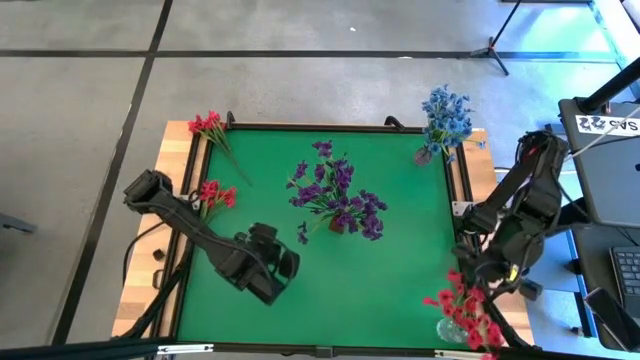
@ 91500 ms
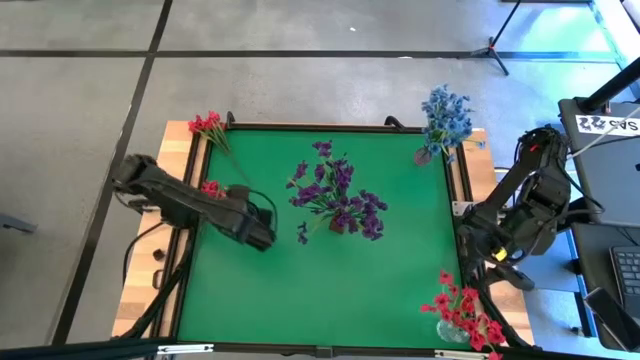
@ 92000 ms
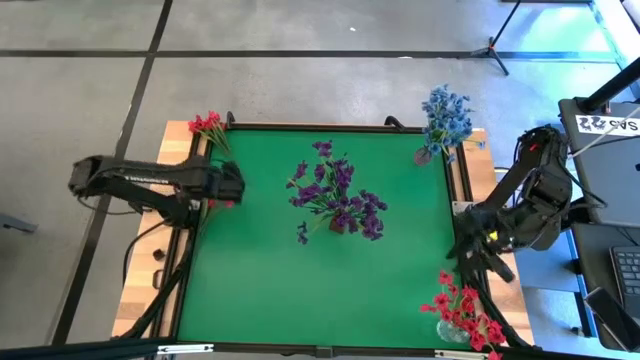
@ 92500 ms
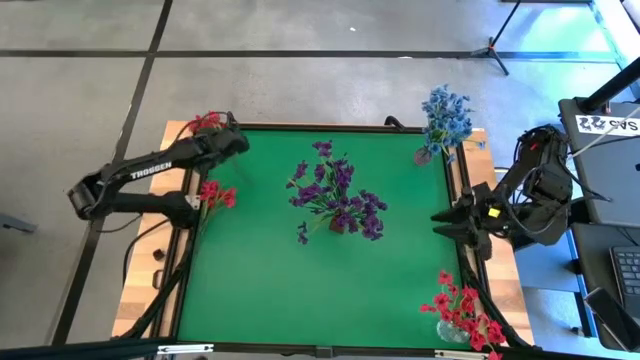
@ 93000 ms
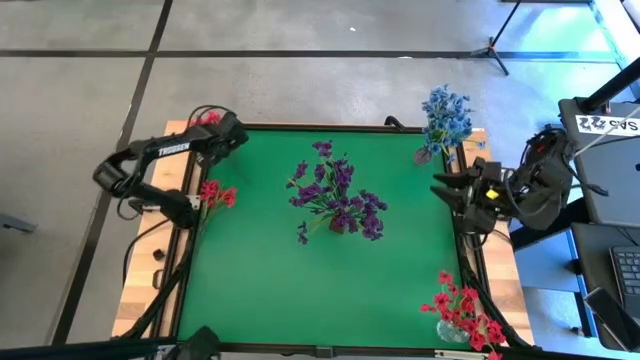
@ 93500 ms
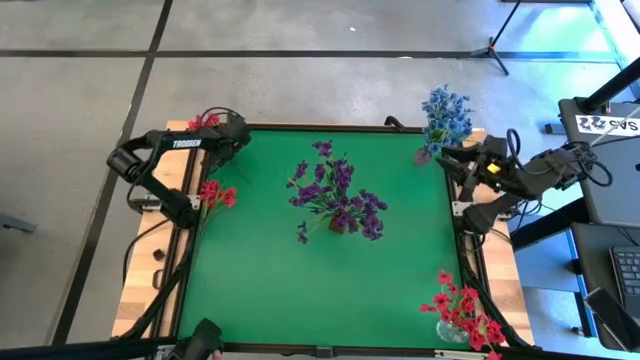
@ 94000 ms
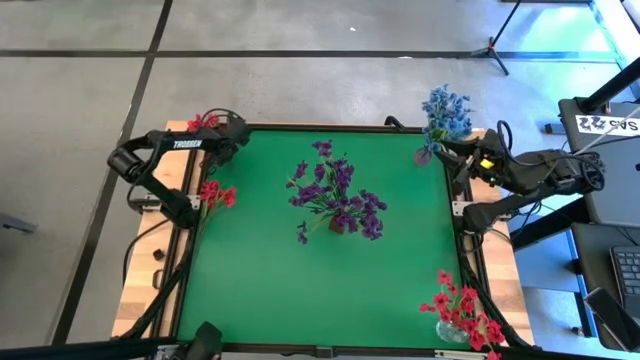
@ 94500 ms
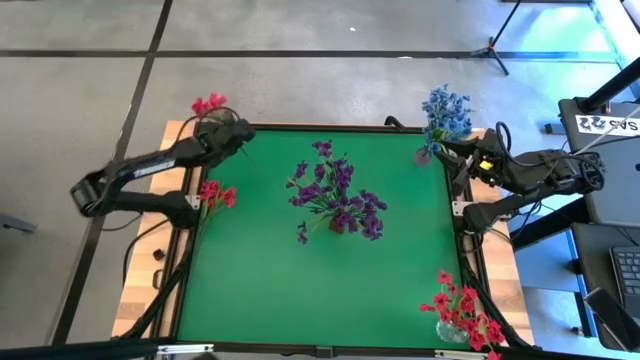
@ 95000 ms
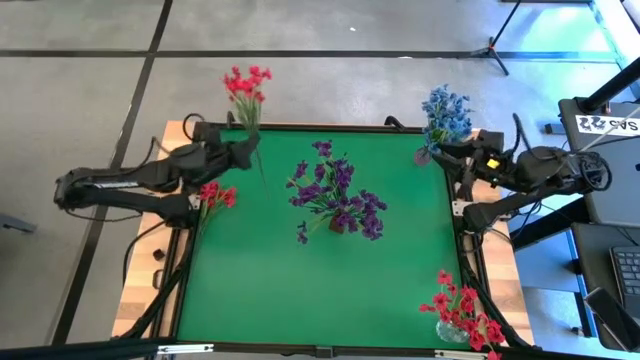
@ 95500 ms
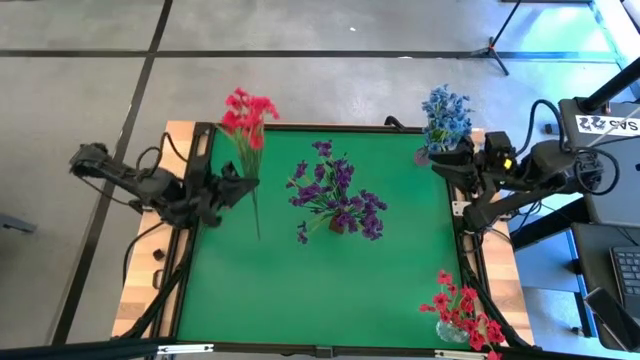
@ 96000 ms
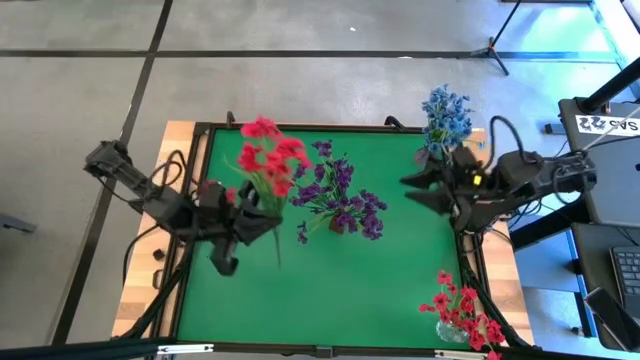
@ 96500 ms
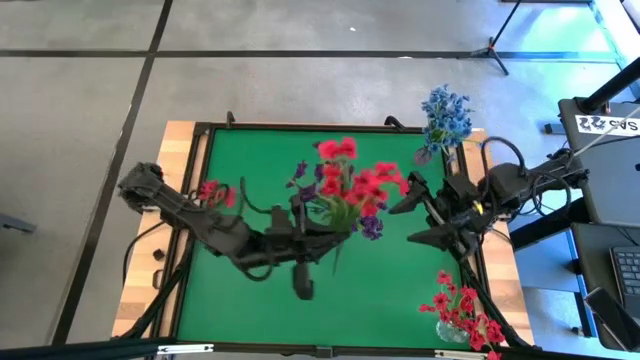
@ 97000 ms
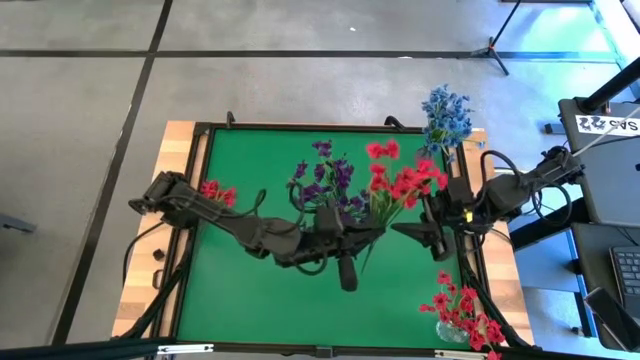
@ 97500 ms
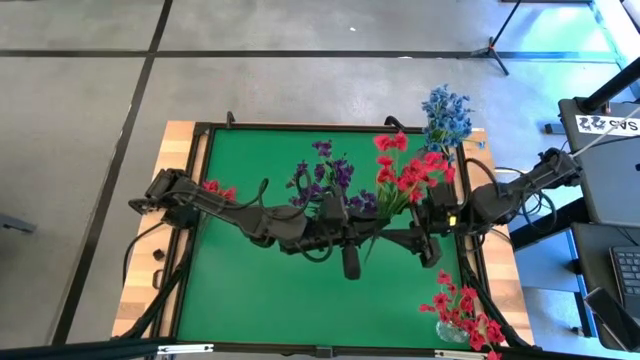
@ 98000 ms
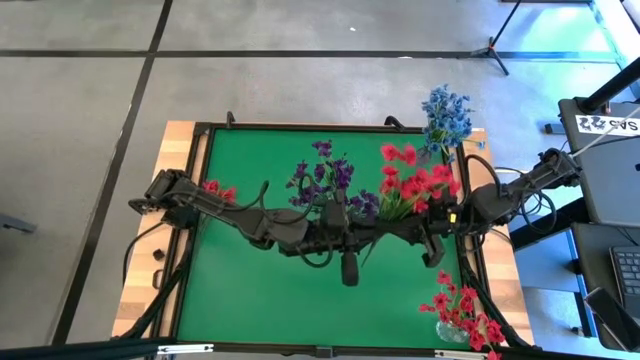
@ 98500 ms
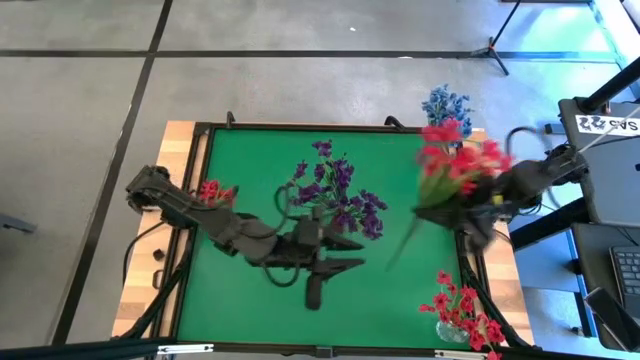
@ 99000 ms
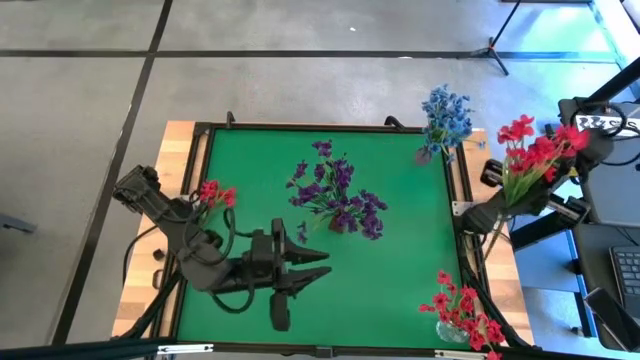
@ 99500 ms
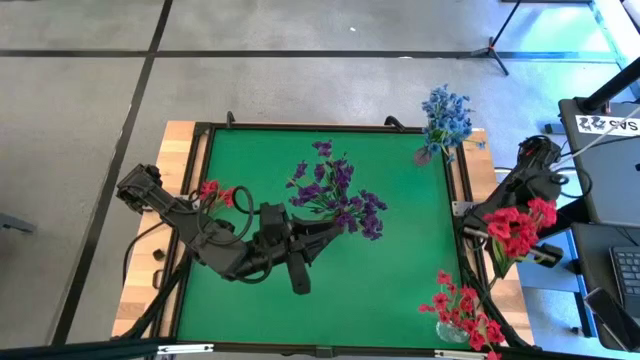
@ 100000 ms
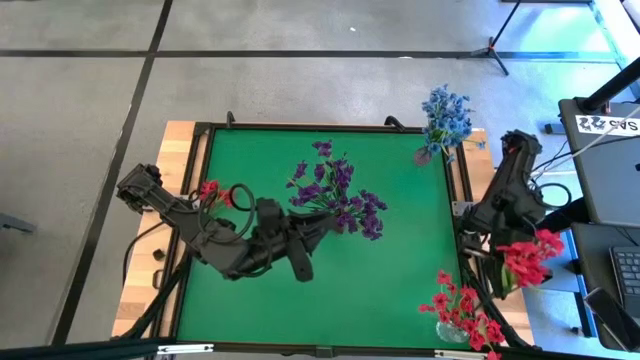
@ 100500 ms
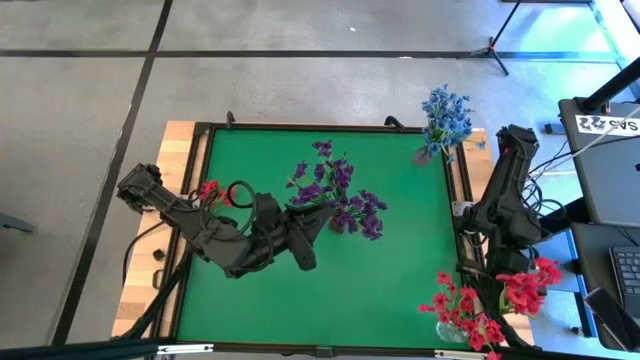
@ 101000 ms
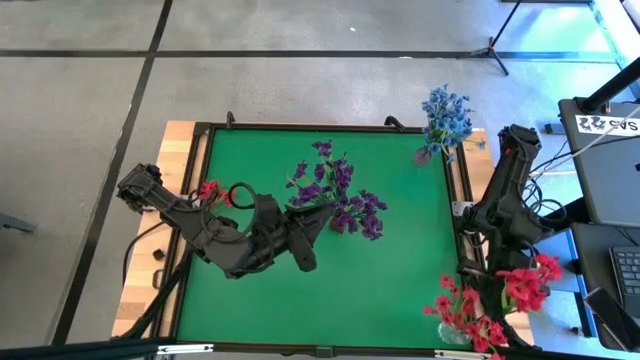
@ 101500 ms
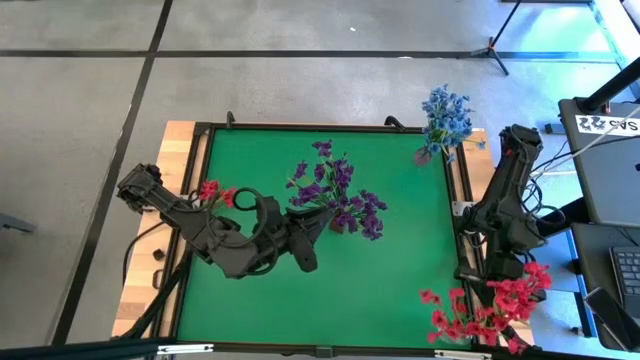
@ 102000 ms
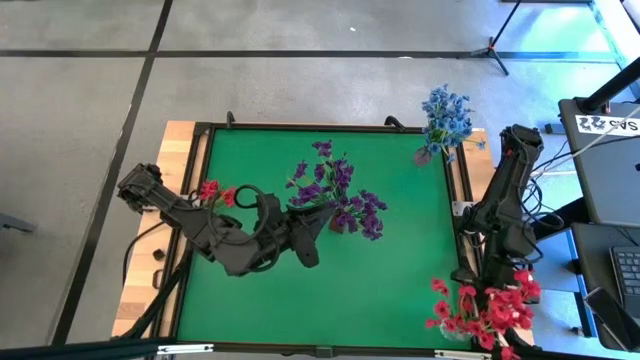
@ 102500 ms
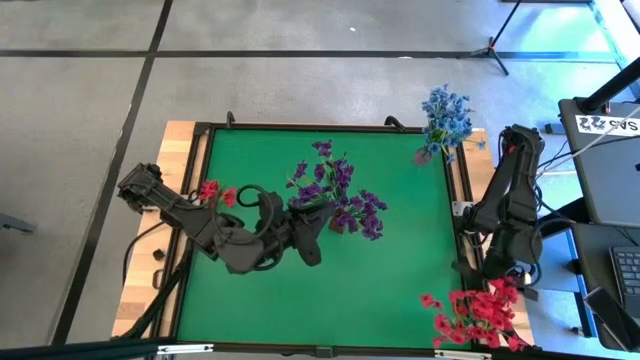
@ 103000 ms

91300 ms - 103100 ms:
Task: Sort flowers into vase by color
Put the top red flowers into the transparent vase

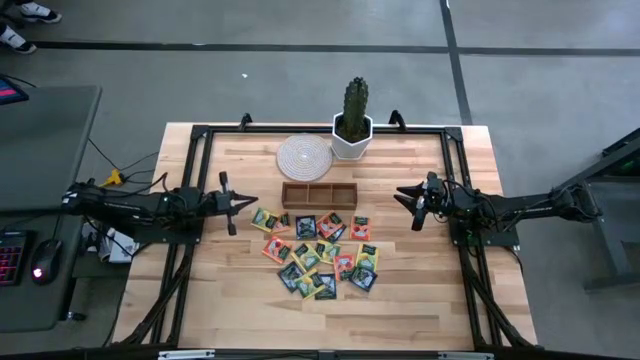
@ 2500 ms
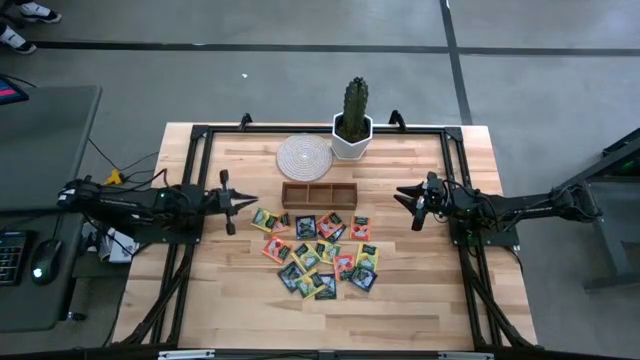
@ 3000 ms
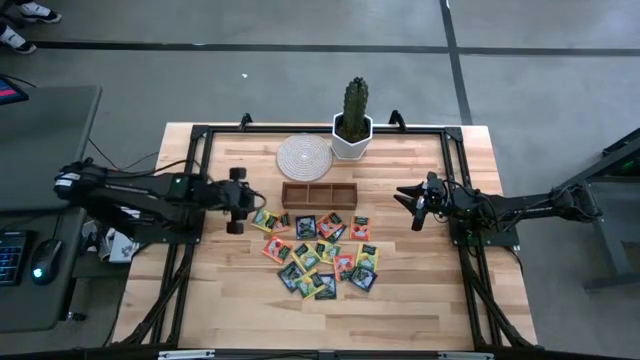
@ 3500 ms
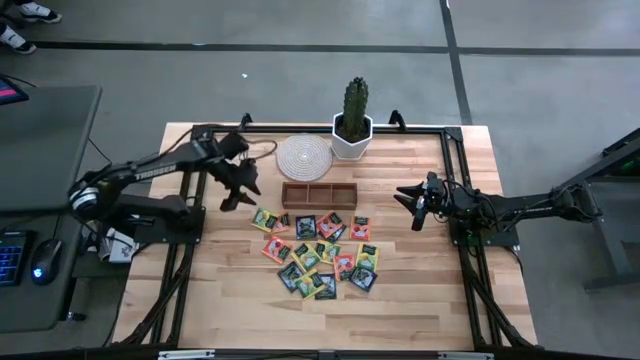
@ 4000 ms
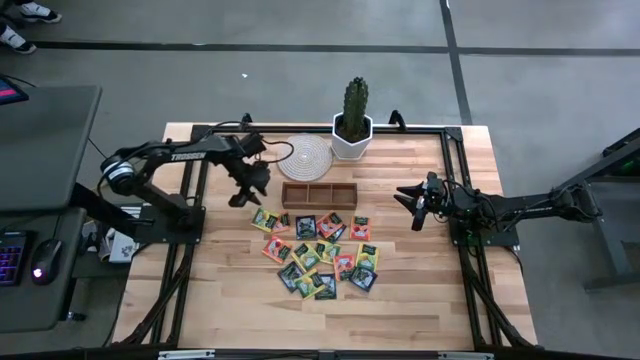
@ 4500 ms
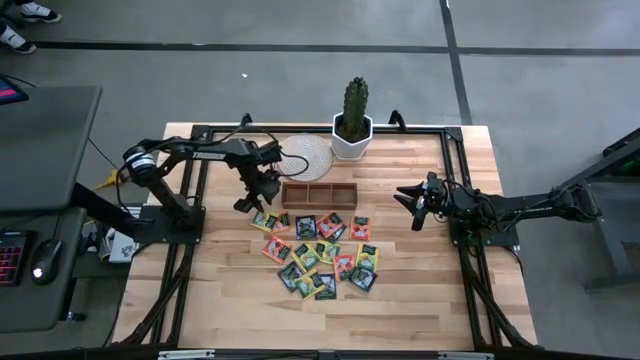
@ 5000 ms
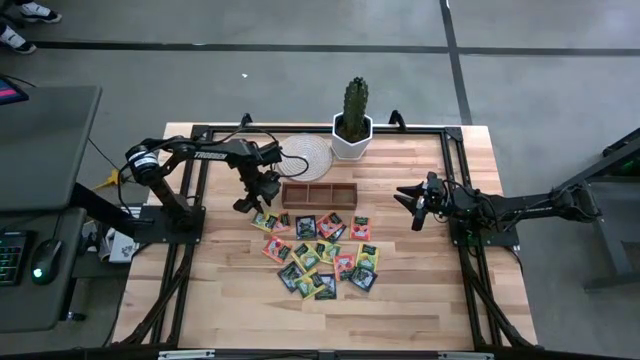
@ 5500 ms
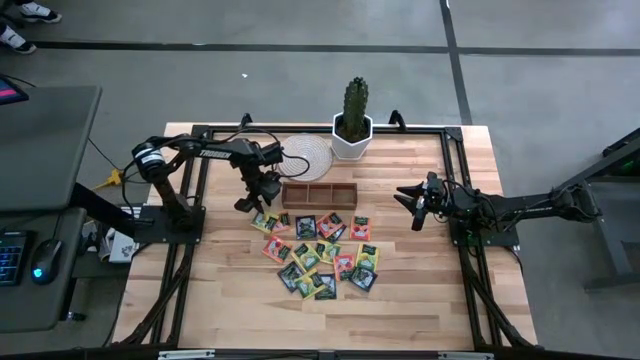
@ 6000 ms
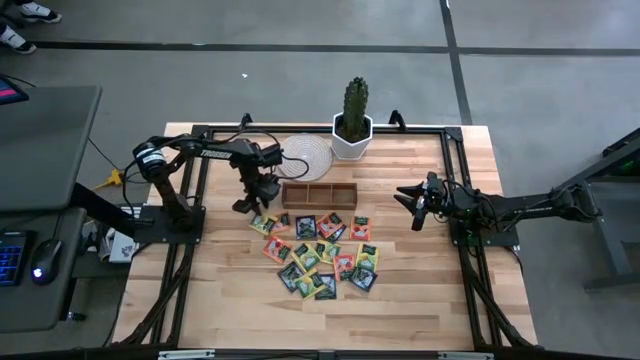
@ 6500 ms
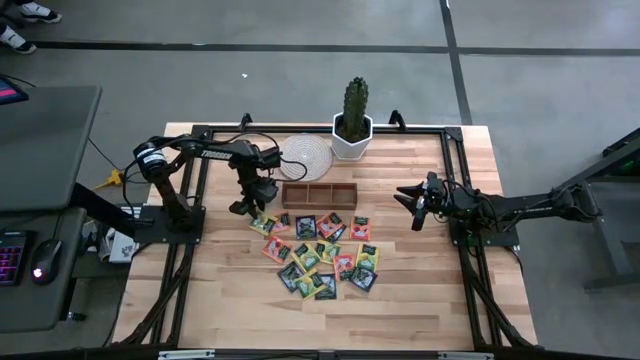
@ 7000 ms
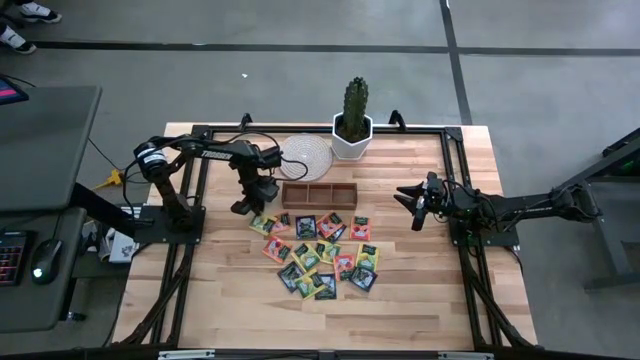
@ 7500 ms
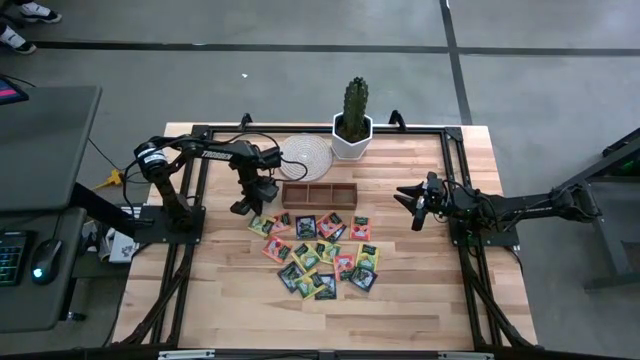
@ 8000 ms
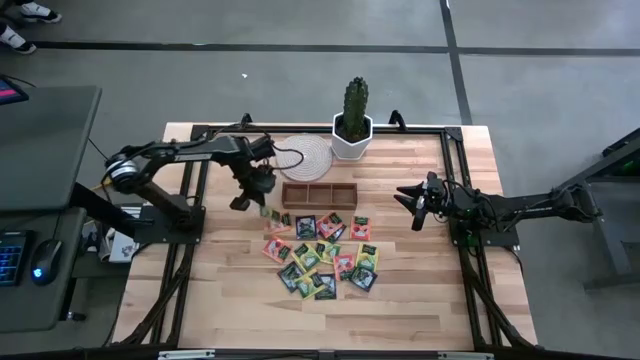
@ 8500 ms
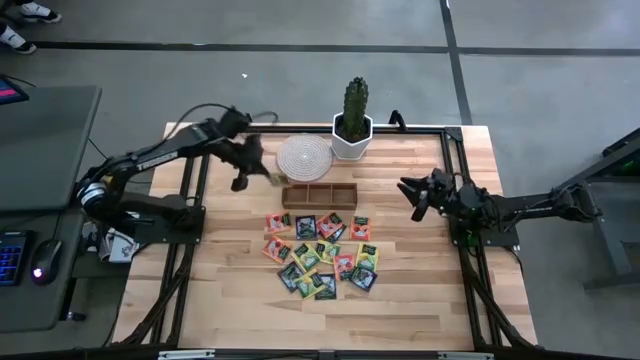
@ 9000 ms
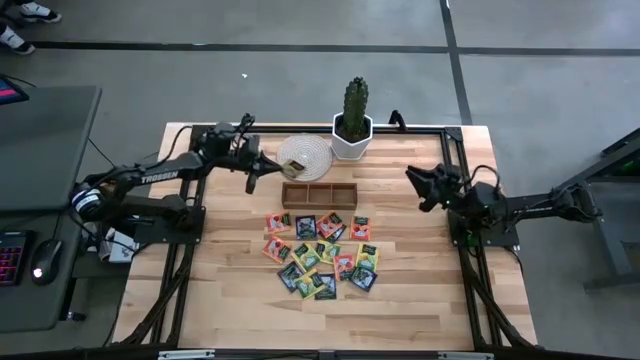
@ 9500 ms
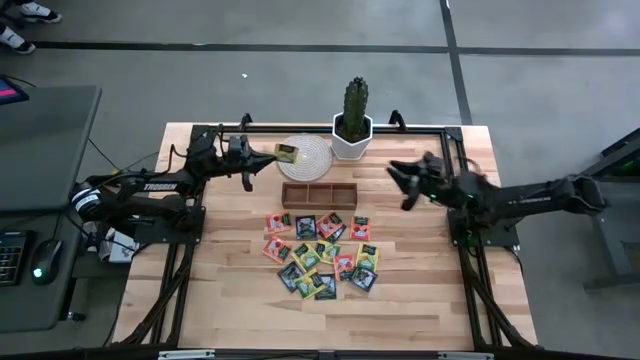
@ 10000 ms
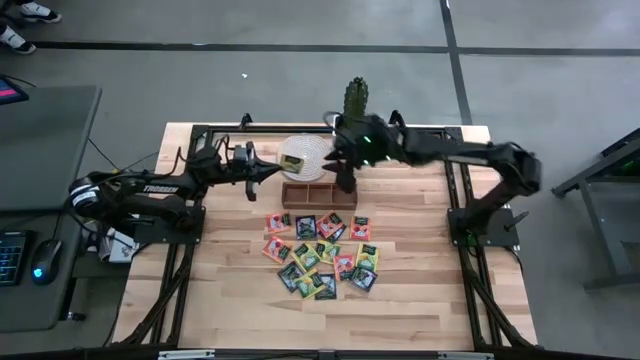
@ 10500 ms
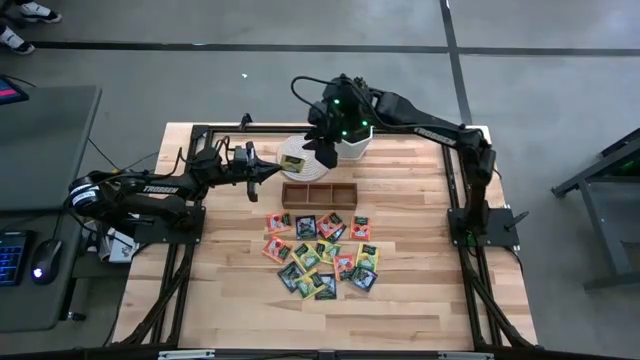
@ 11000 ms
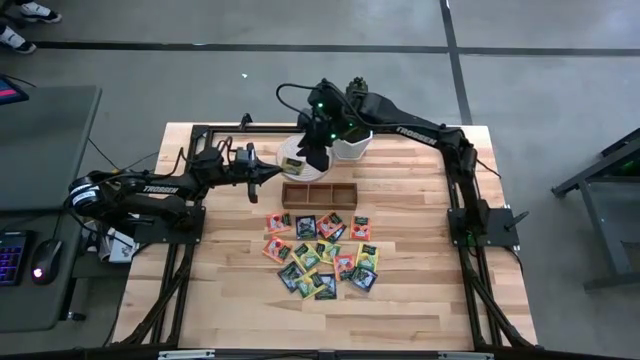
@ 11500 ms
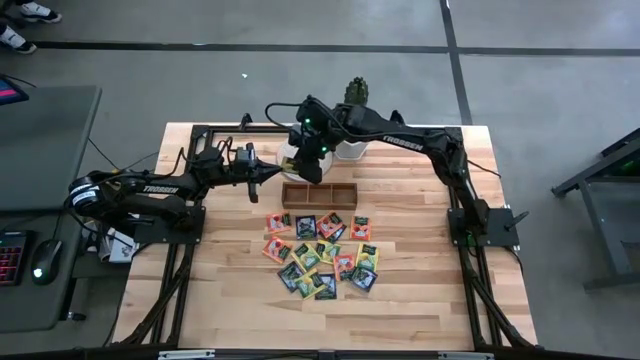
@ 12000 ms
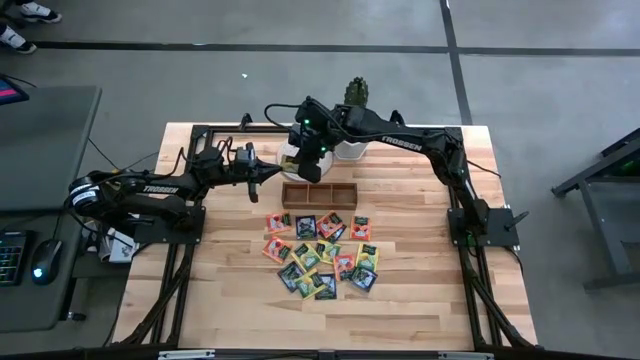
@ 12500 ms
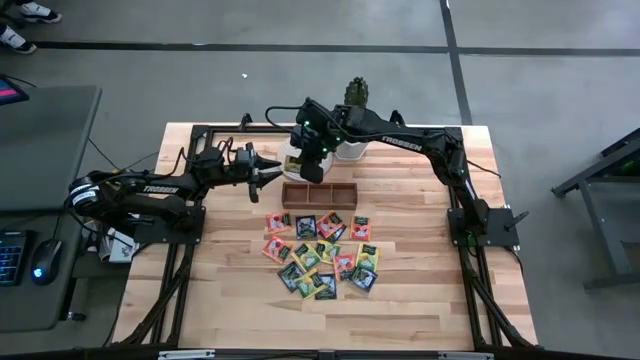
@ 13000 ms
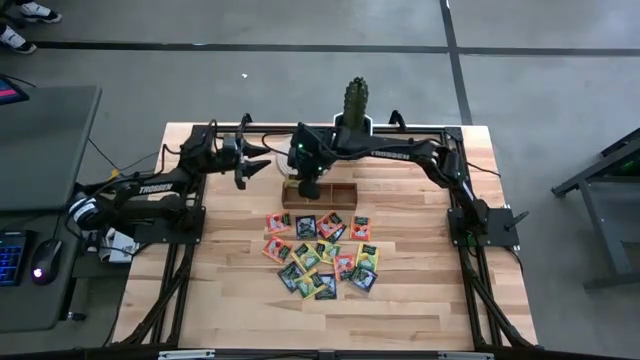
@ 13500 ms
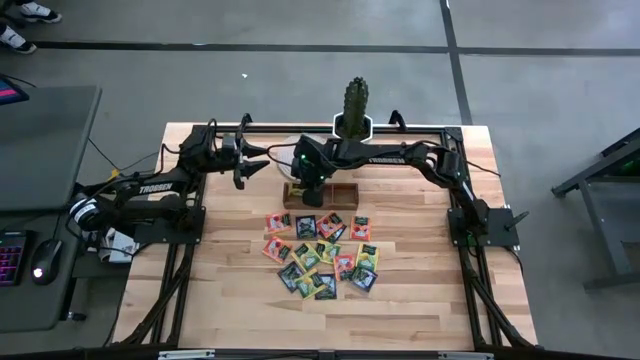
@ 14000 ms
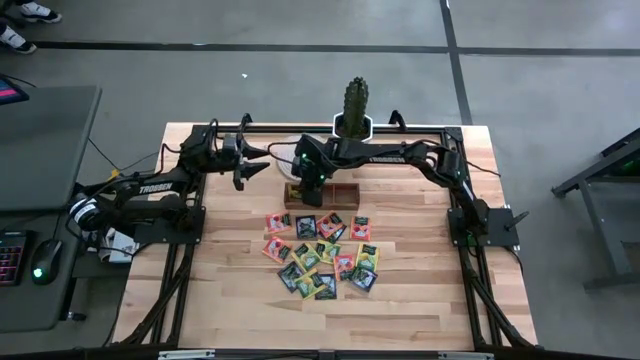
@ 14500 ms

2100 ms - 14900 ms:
Task: Pick & Place Tea
Put the yellow tea bag into the left section of the wooden organizer
